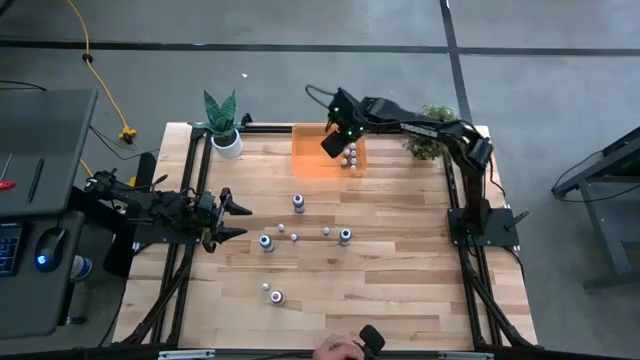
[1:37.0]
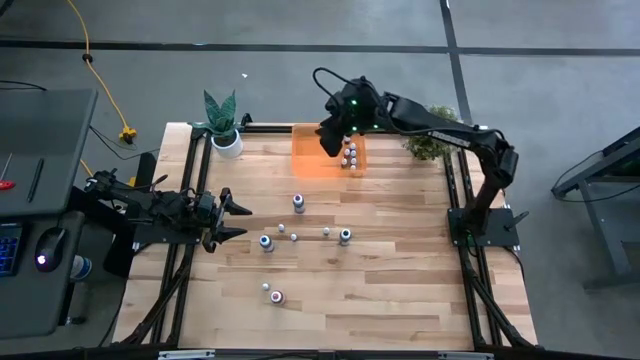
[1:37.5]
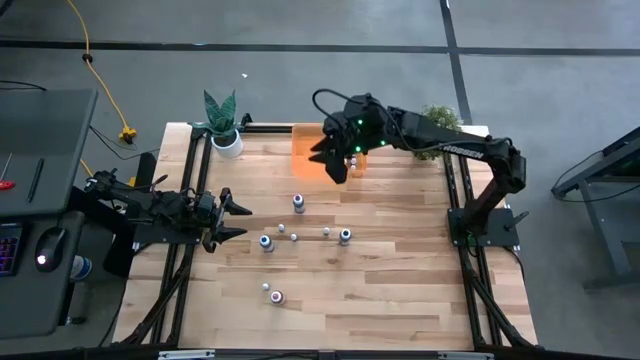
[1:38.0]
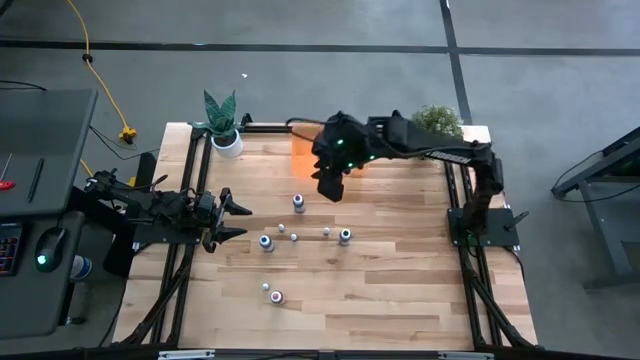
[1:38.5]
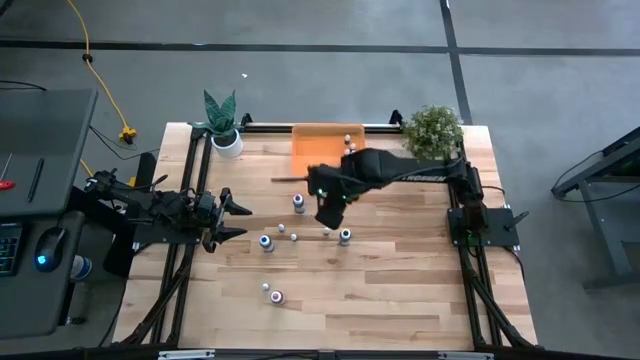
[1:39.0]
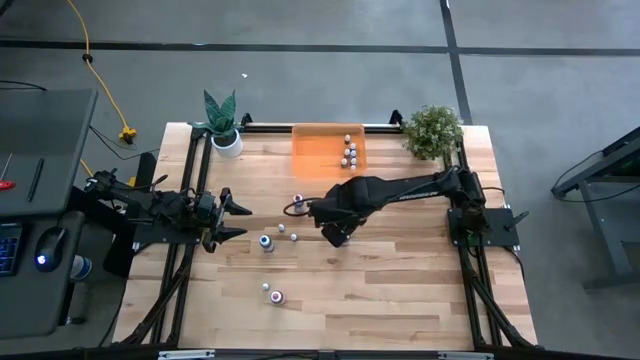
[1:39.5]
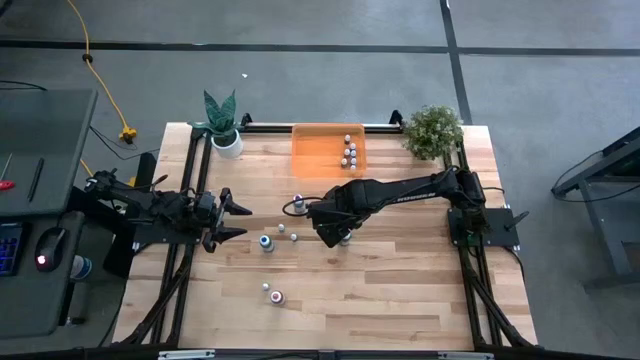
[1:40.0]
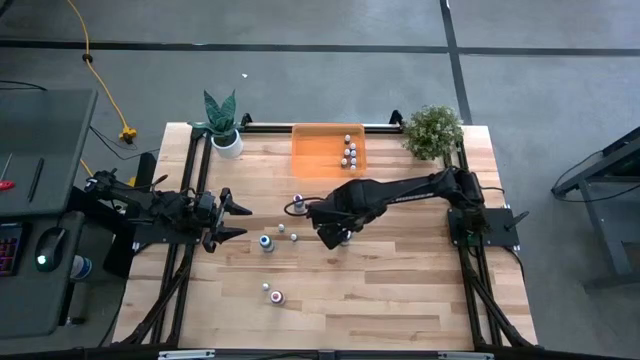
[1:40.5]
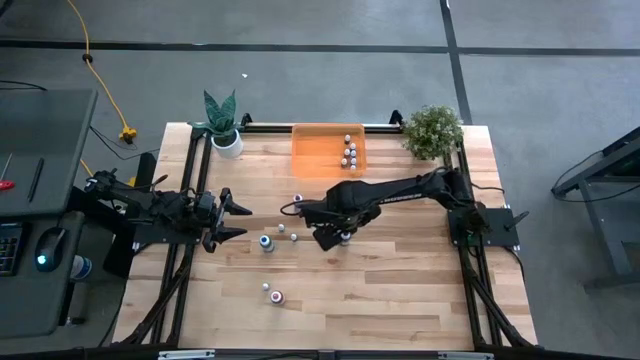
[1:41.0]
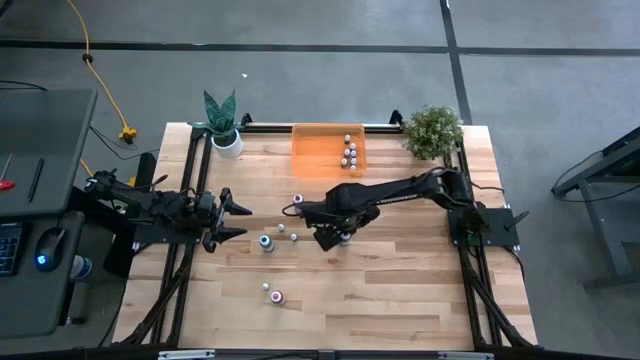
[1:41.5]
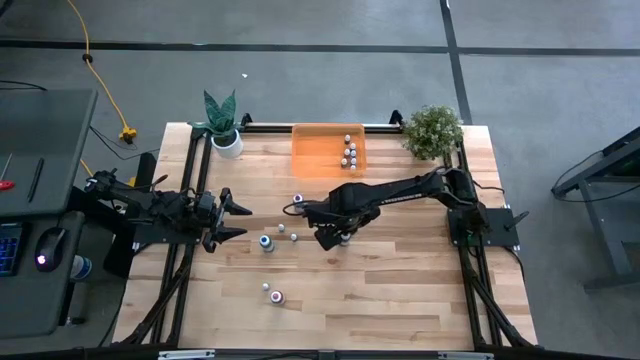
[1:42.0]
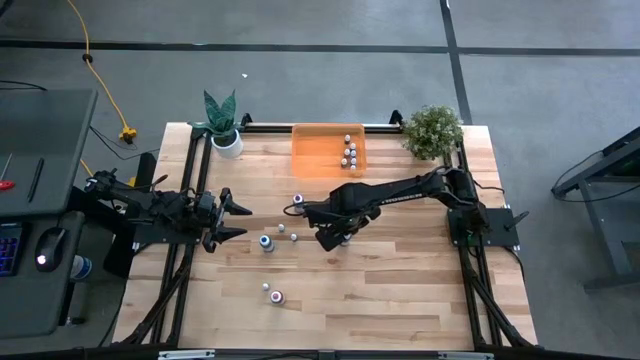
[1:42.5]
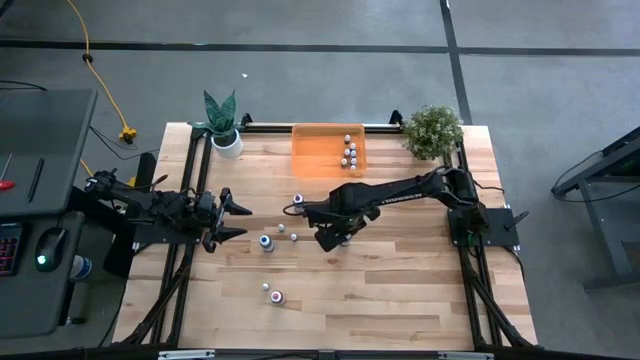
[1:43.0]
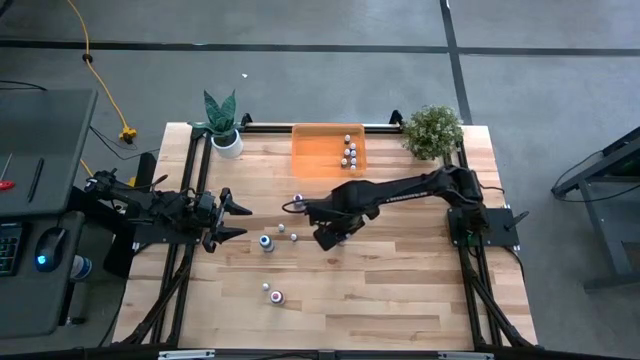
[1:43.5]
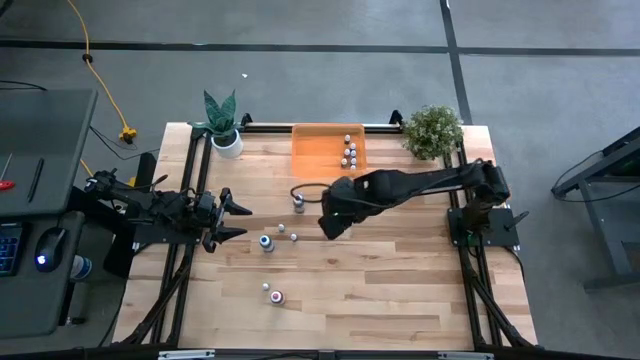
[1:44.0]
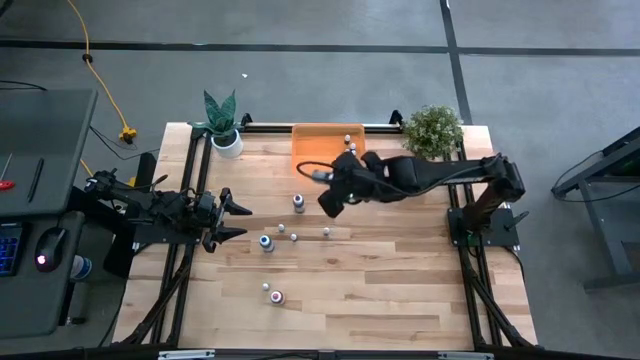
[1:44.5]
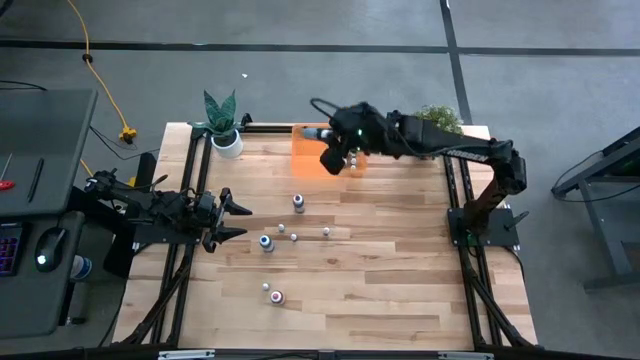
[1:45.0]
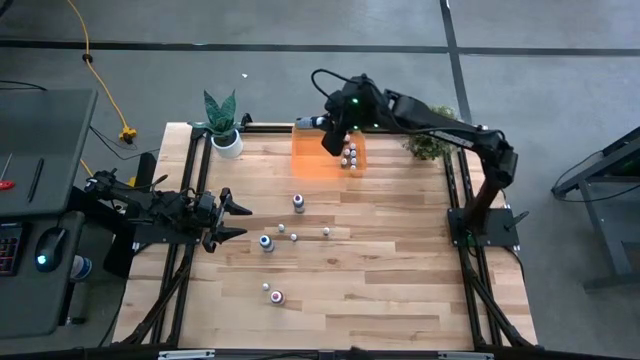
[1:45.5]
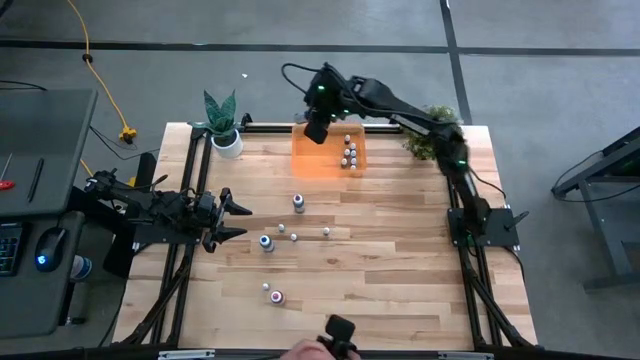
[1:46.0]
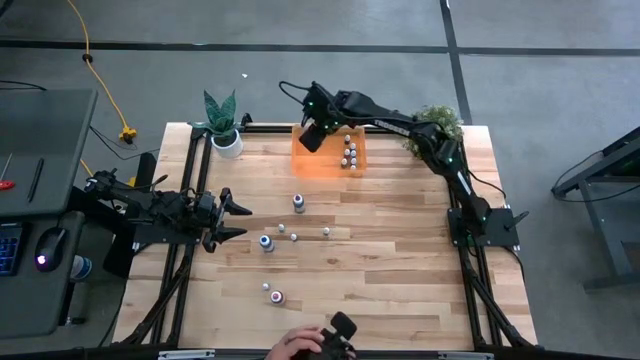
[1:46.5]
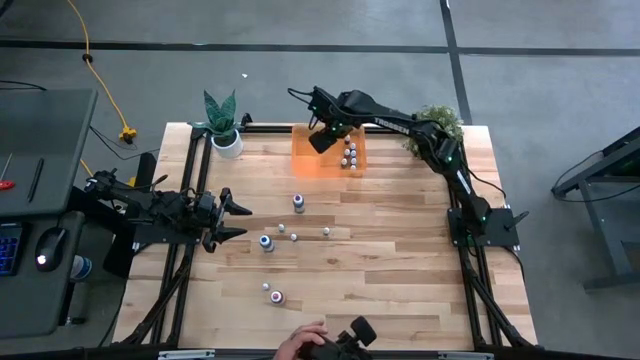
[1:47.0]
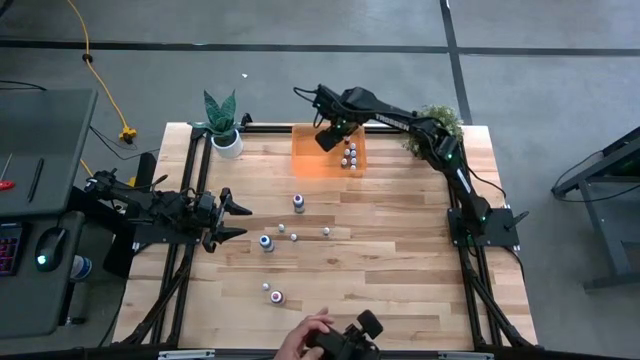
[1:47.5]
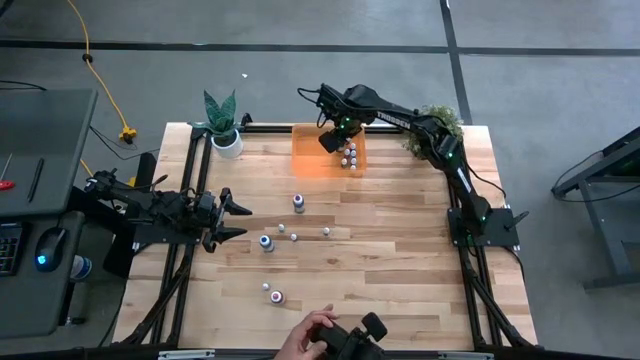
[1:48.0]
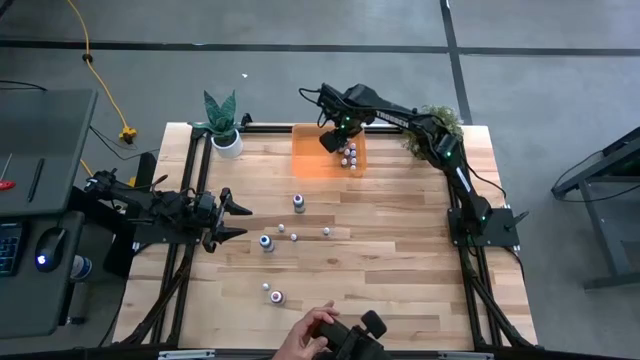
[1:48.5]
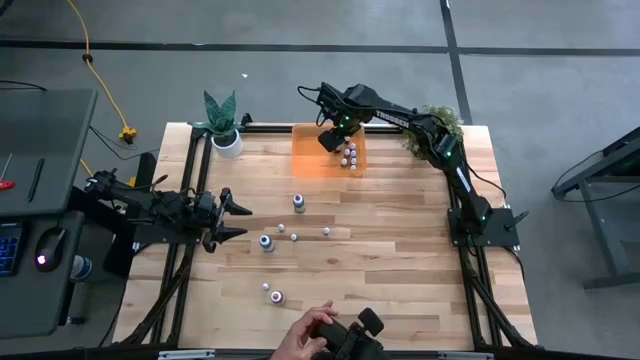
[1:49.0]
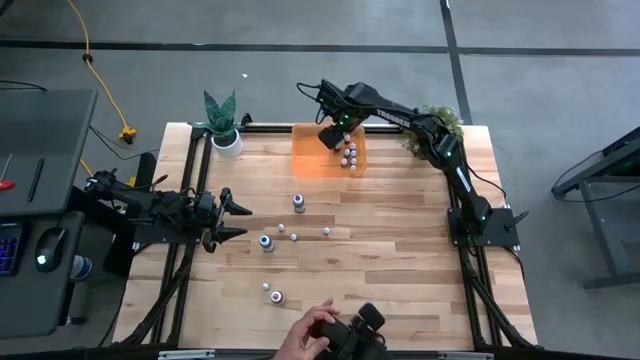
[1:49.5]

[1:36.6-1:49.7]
Task: Pick & Place food coloring
Put the big black food coloring bottle into the orange bin

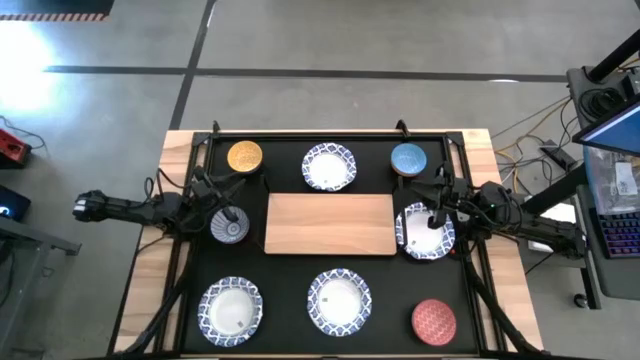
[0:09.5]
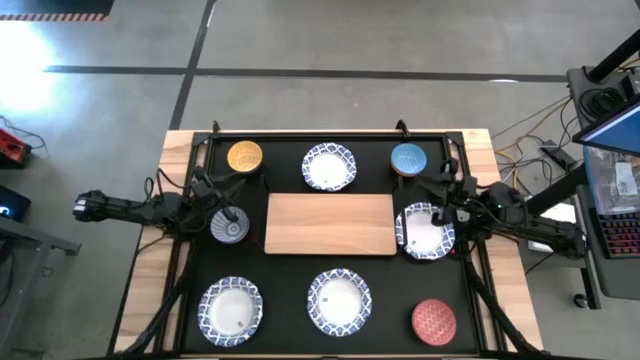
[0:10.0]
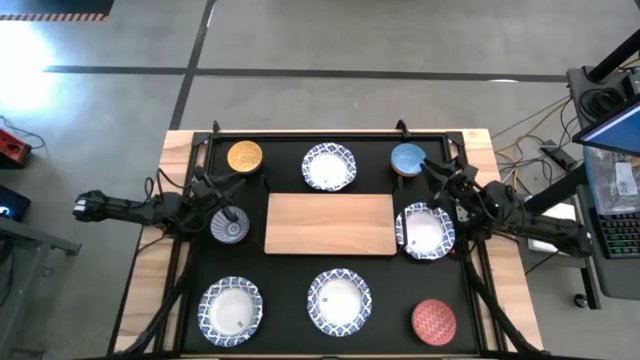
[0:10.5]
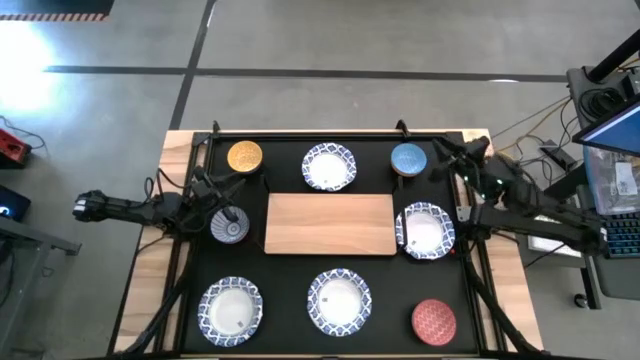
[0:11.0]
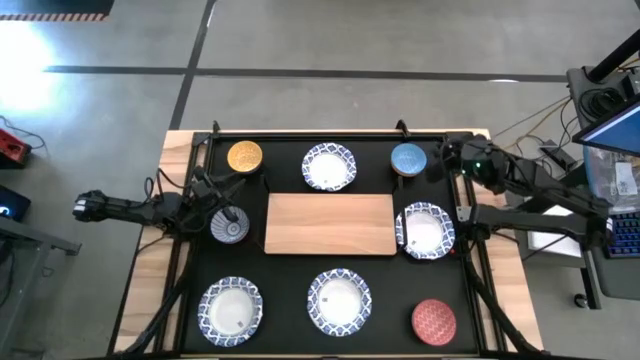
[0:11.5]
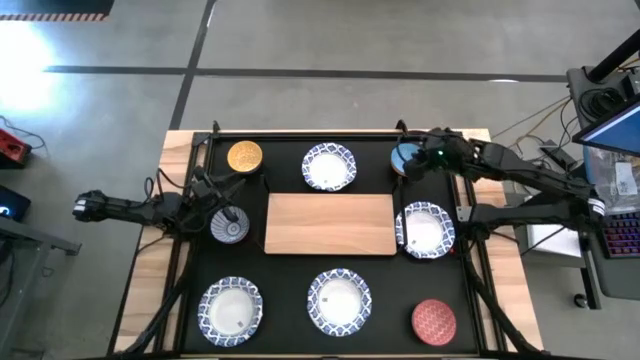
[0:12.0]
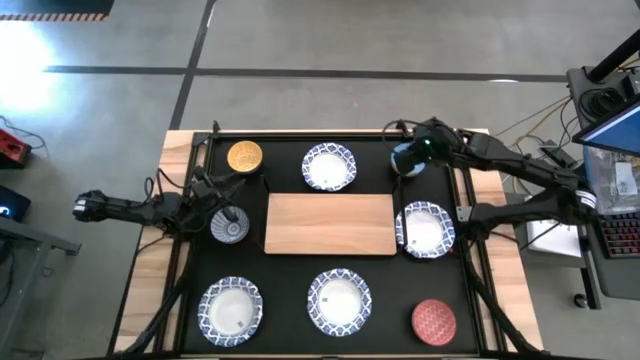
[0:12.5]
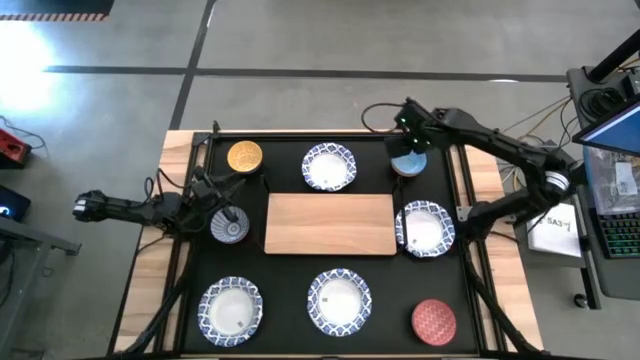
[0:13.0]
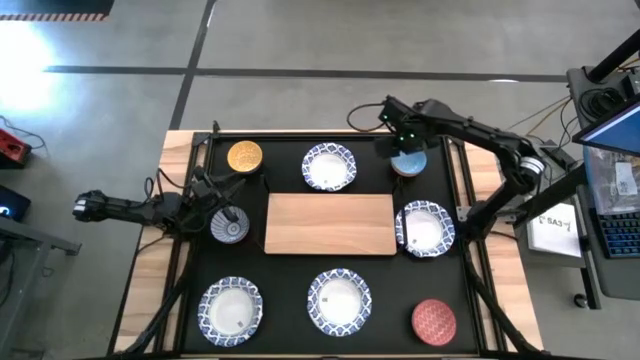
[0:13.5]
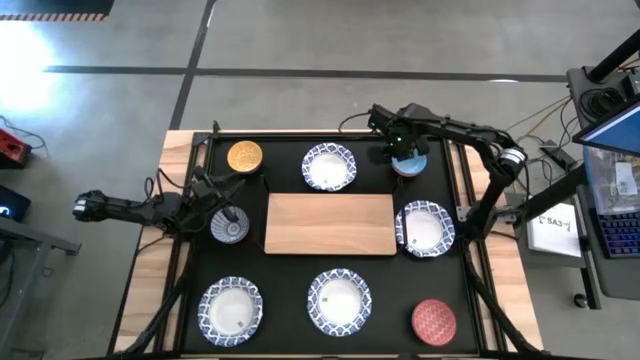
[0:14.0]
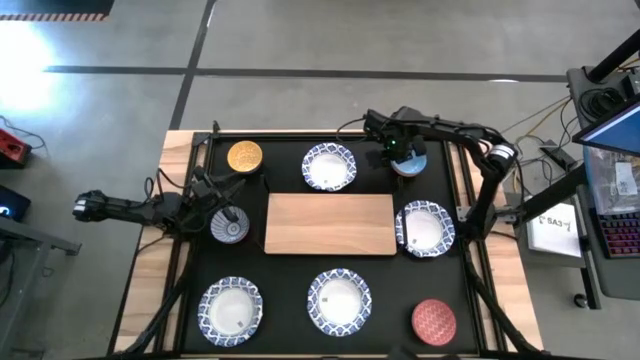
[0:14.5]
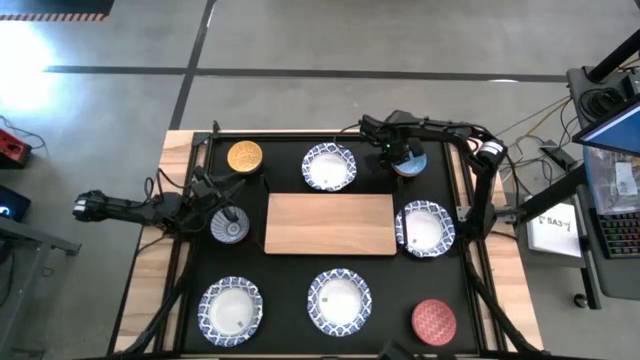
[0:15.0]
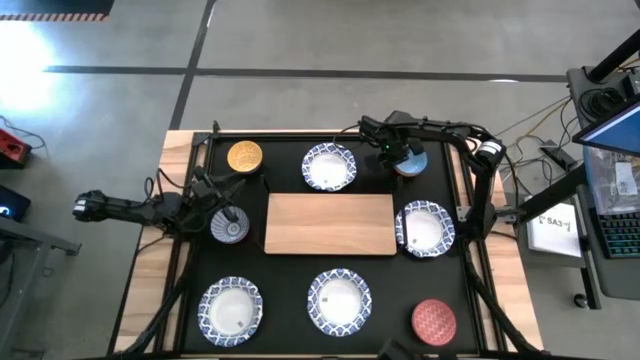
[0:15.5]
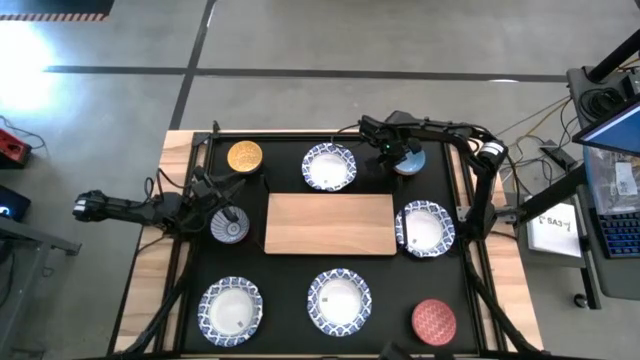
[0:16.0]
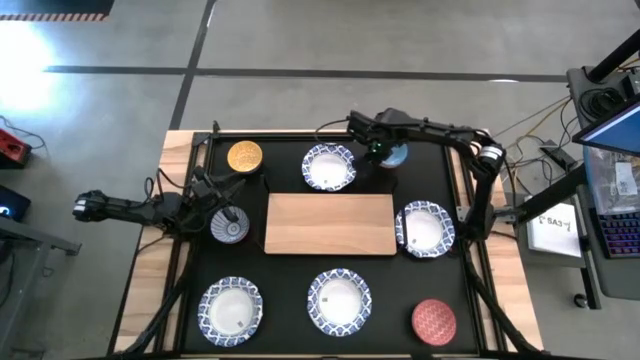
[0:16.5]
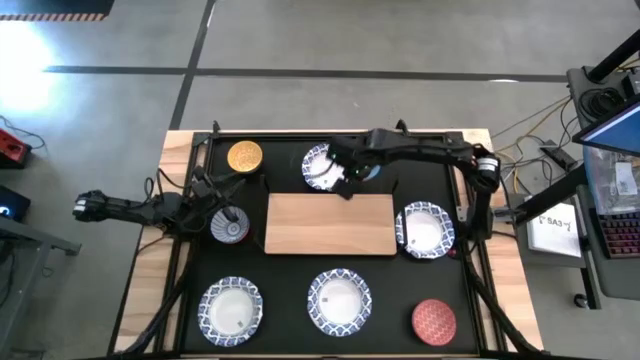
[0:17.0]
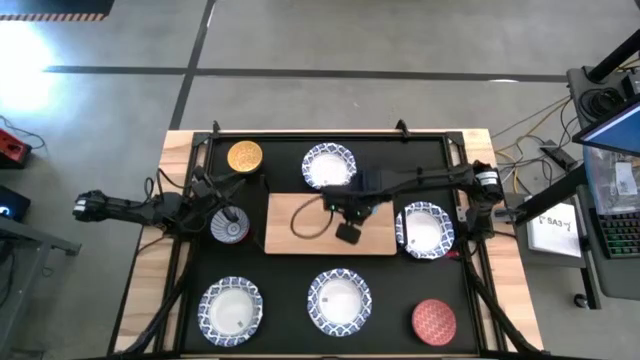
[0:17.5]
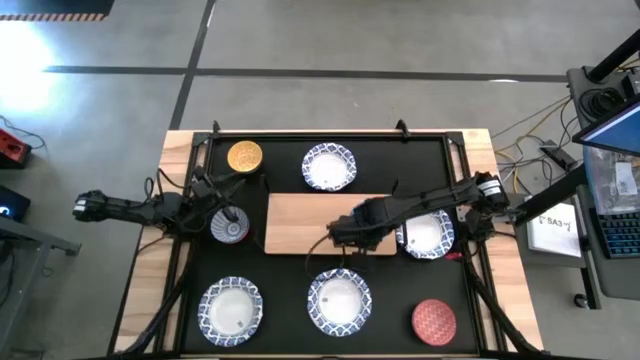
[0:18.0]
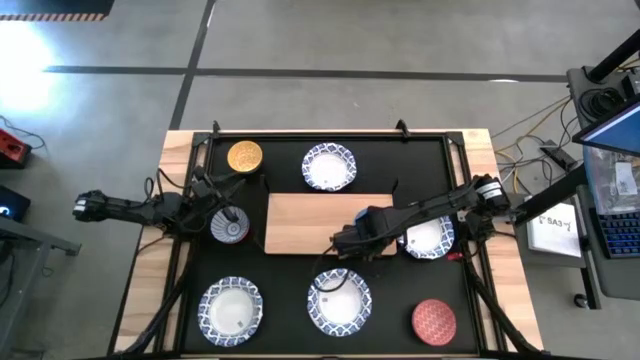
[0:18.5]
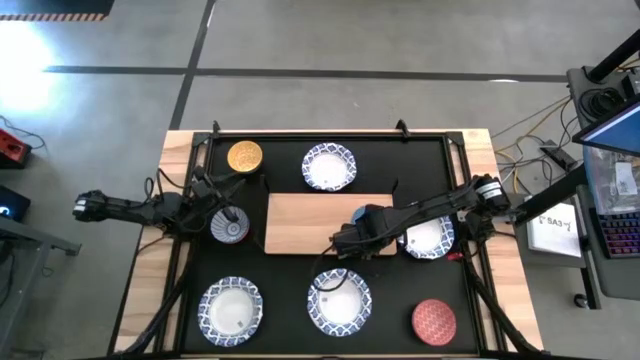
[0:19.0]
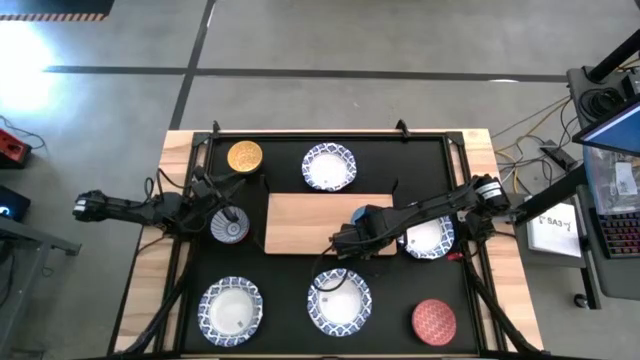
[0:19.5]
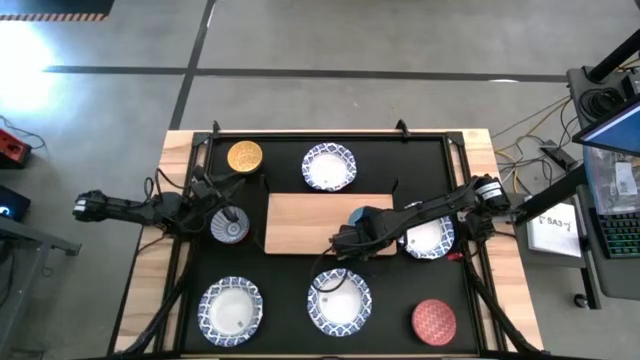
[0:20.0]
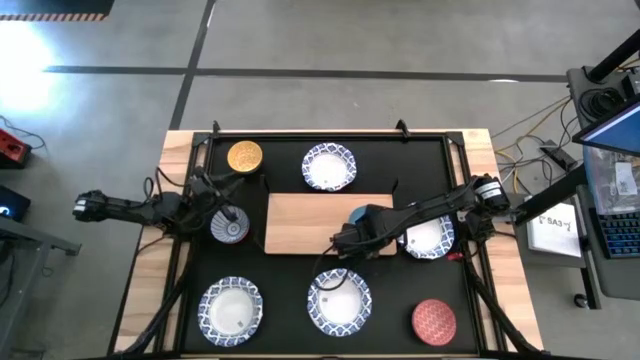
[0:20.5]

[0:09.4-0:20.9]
Task: Place and stack bowls onto a shelf
Put the small light blue and yellow patterned bowl on the shelf
